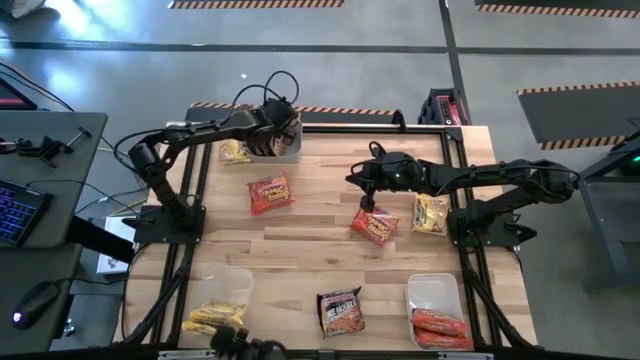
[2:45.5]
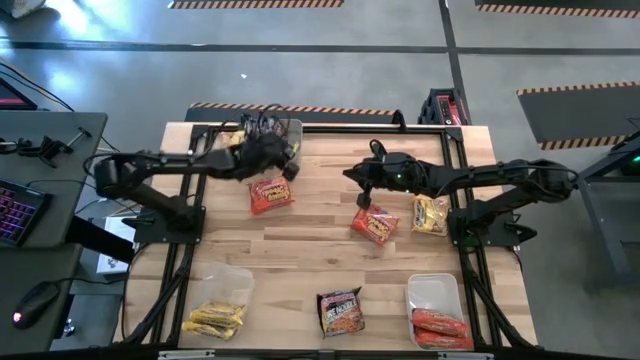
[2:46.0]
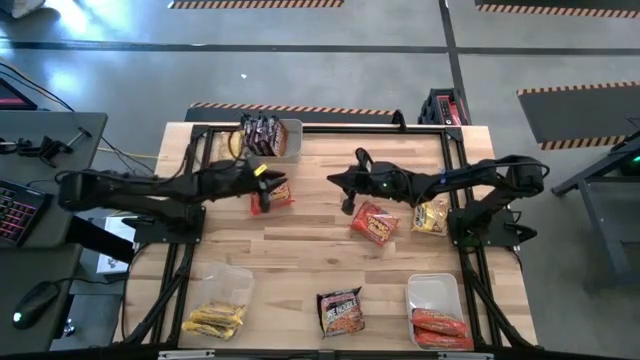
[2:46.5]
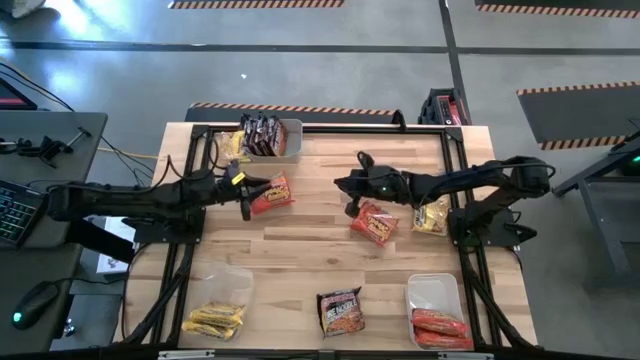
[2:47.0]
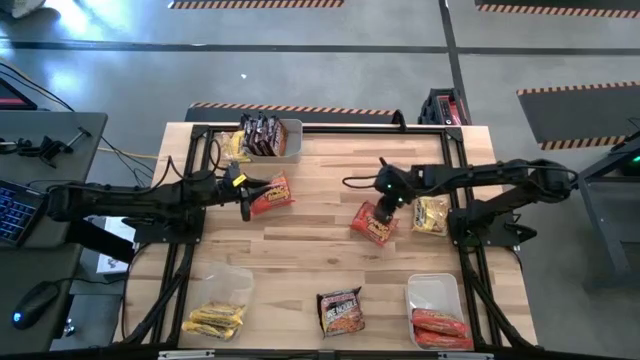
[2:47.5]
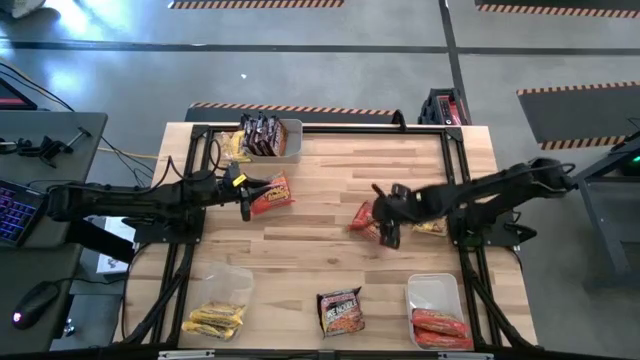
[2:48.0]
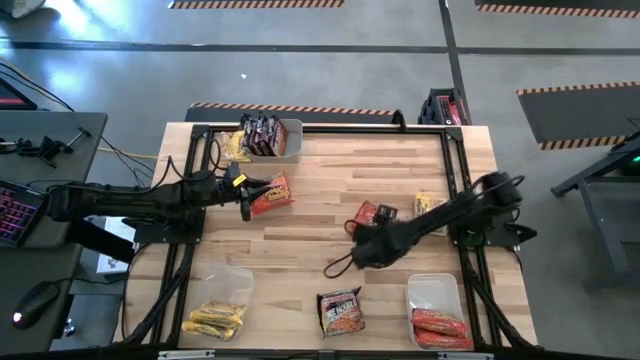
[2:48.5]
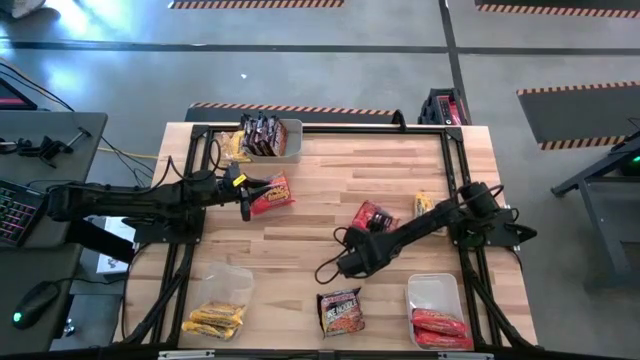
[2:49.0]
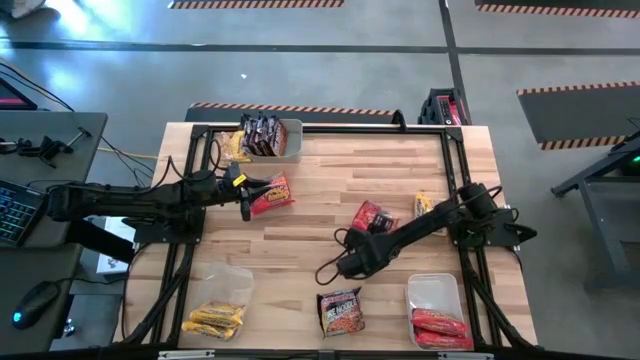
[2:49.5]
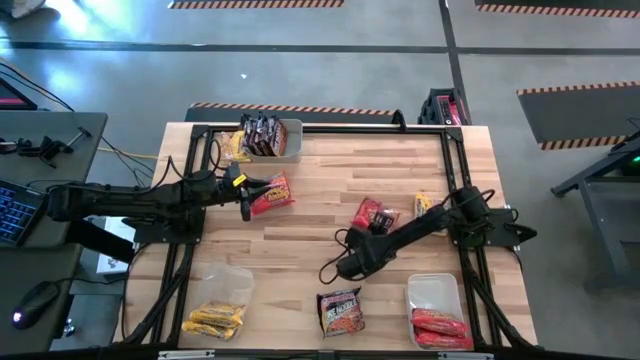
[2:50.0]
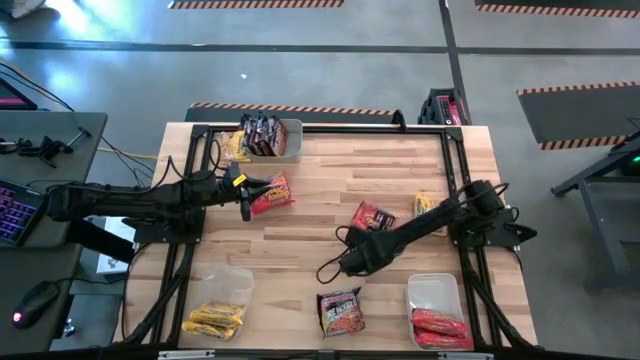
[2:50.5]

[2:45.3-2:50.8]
Task: Sort Maruchan noodles
Put the right orange noodle pack into the white bin

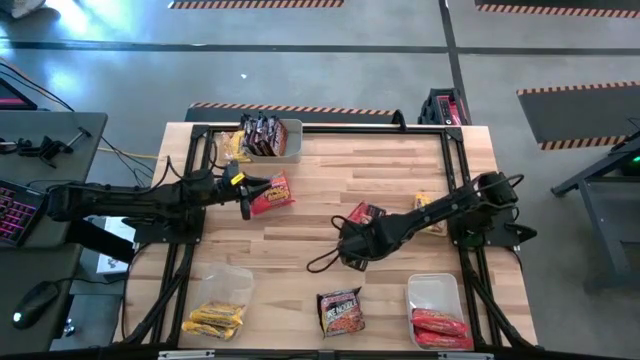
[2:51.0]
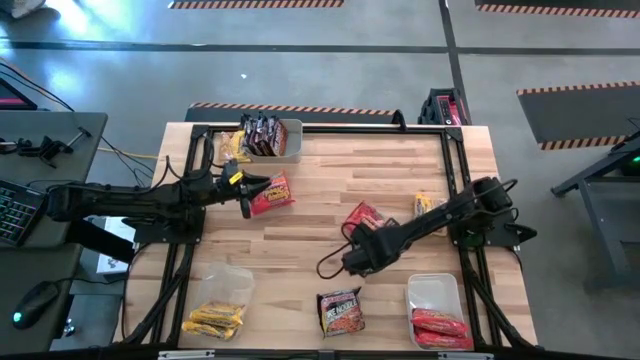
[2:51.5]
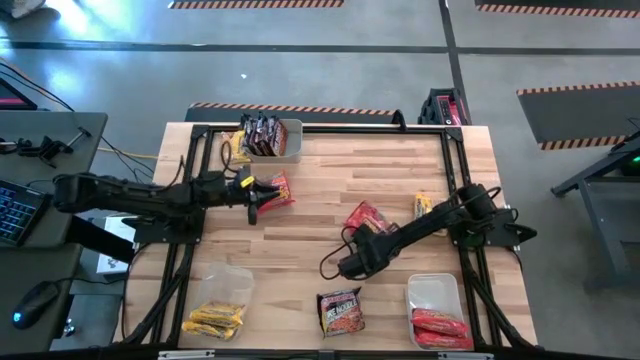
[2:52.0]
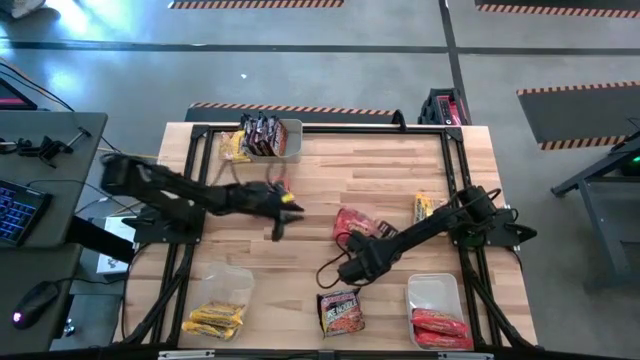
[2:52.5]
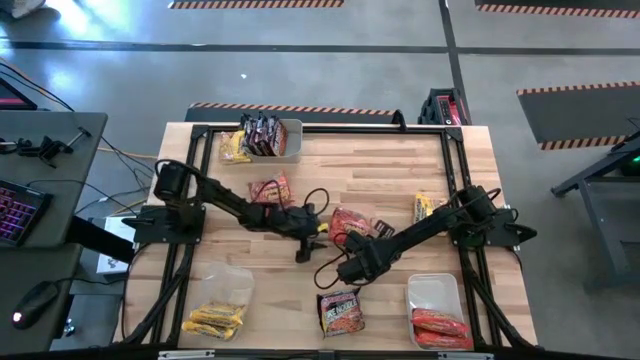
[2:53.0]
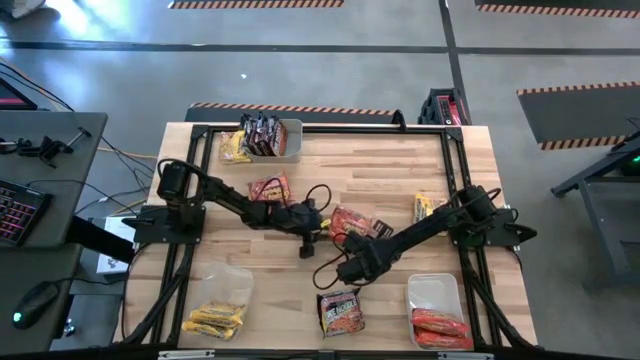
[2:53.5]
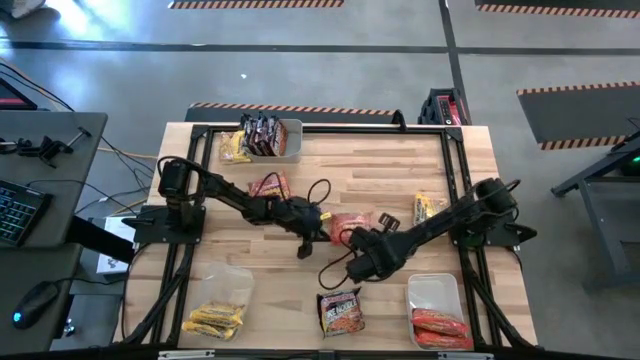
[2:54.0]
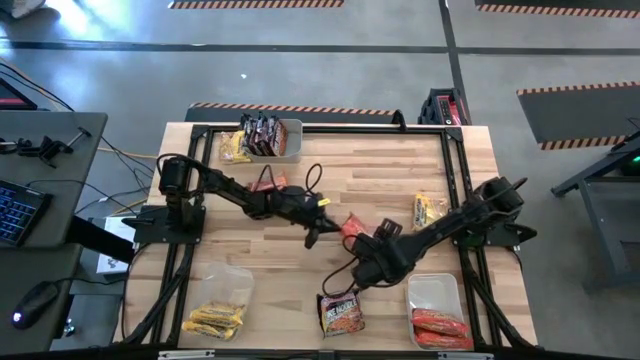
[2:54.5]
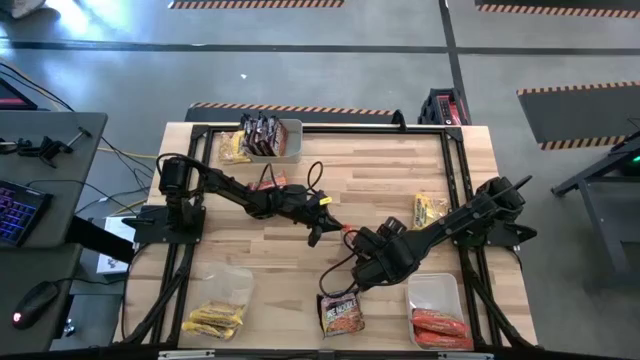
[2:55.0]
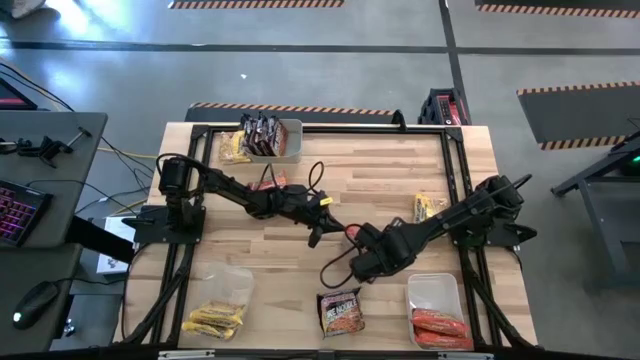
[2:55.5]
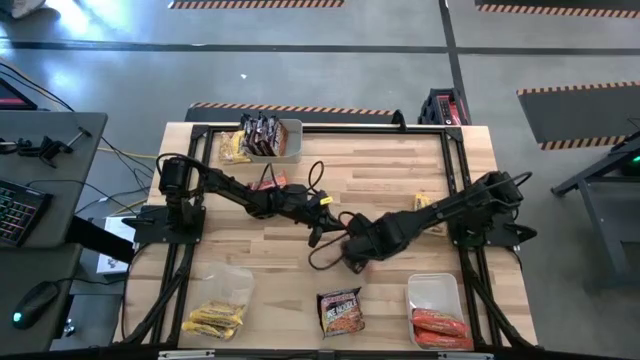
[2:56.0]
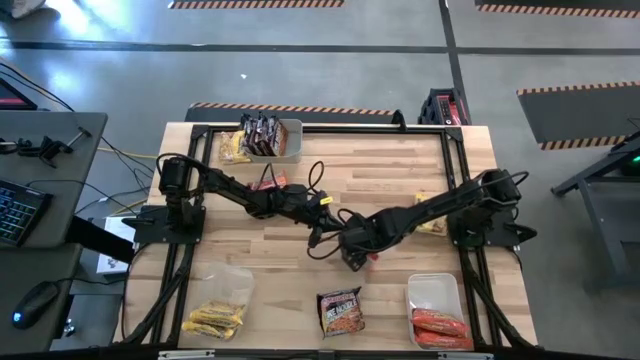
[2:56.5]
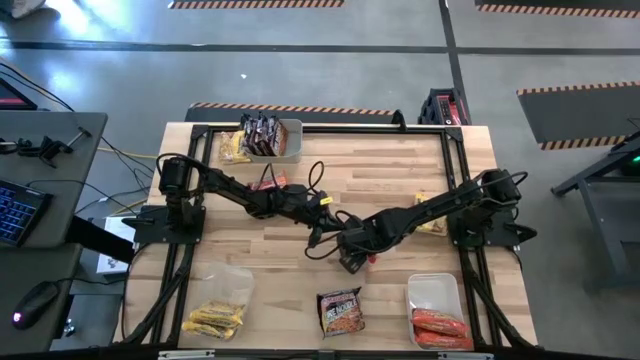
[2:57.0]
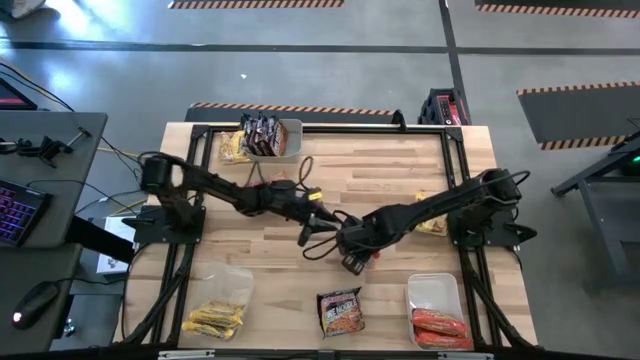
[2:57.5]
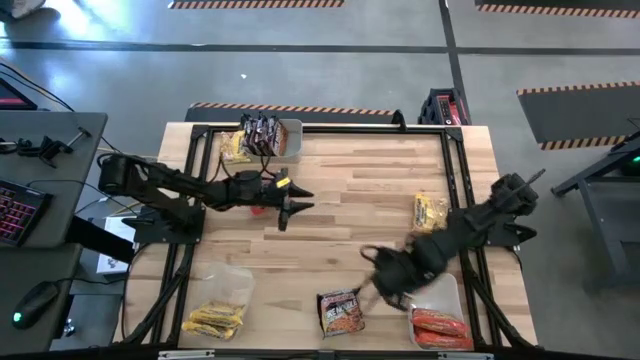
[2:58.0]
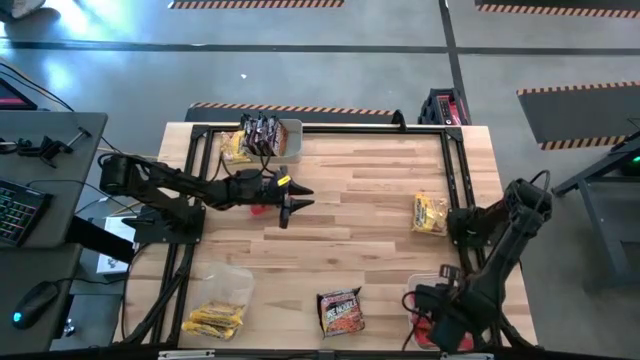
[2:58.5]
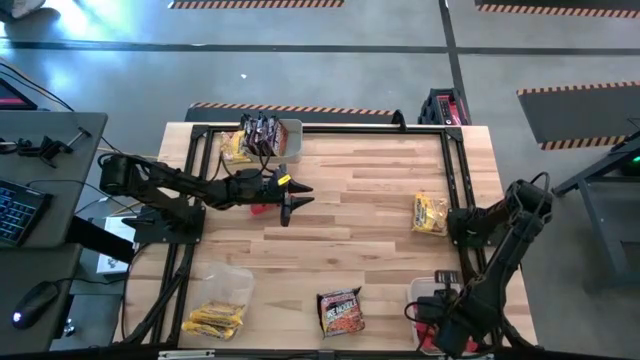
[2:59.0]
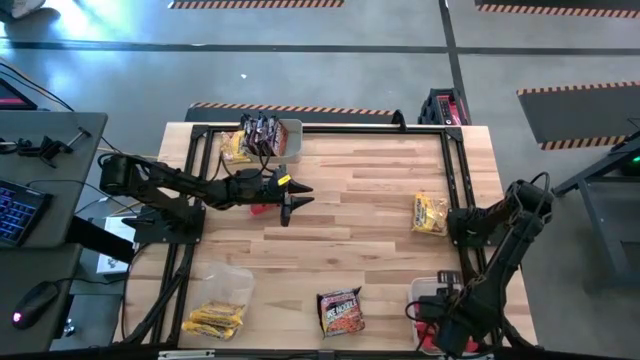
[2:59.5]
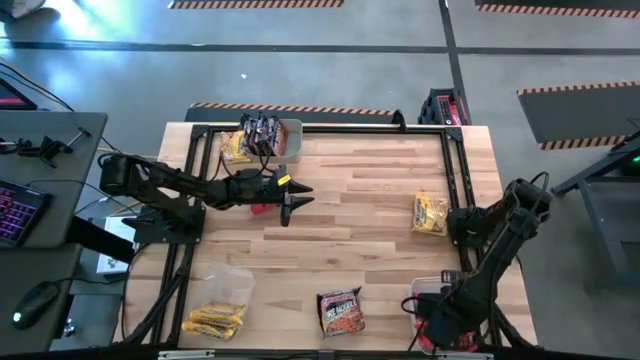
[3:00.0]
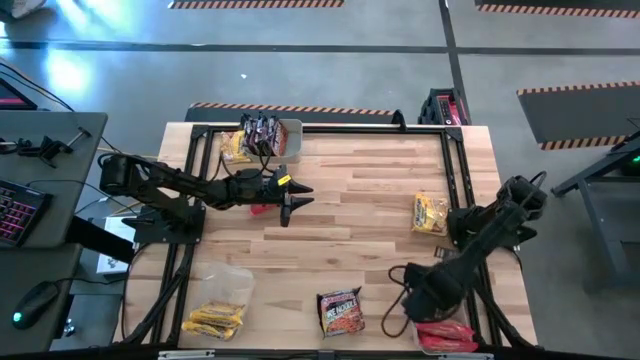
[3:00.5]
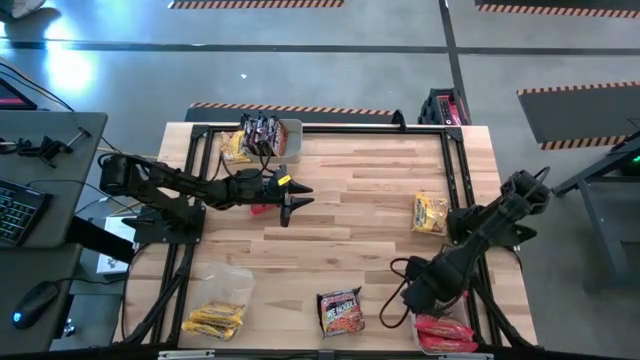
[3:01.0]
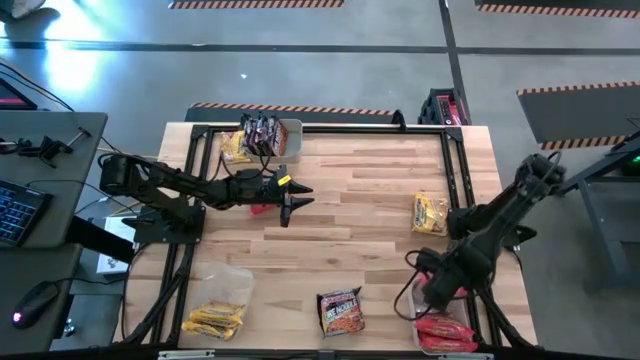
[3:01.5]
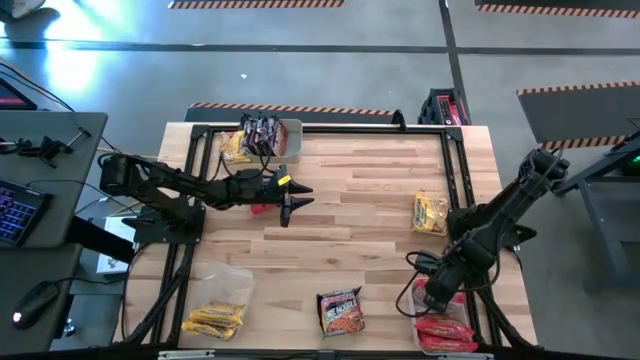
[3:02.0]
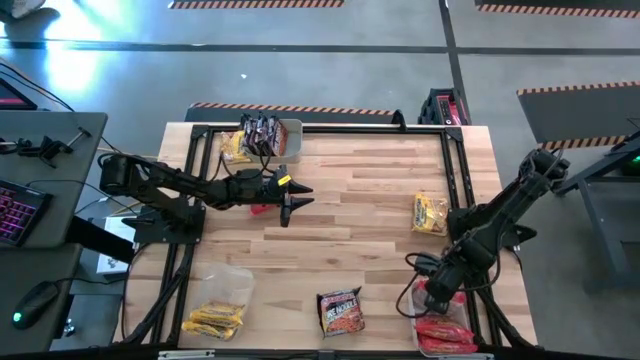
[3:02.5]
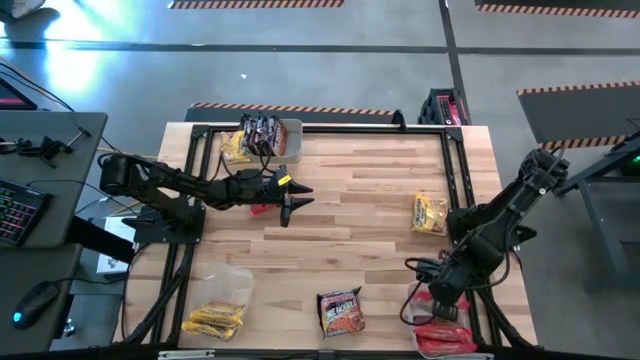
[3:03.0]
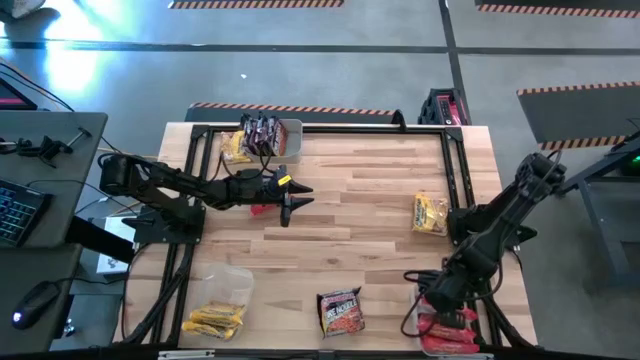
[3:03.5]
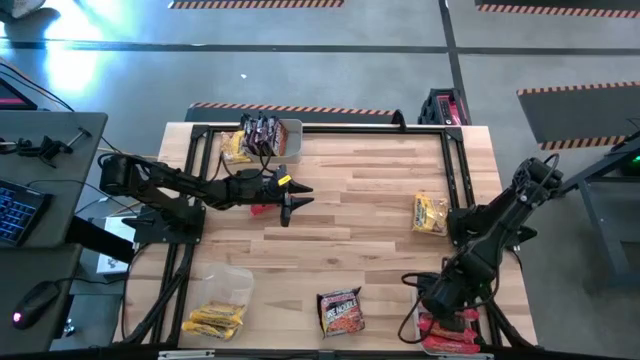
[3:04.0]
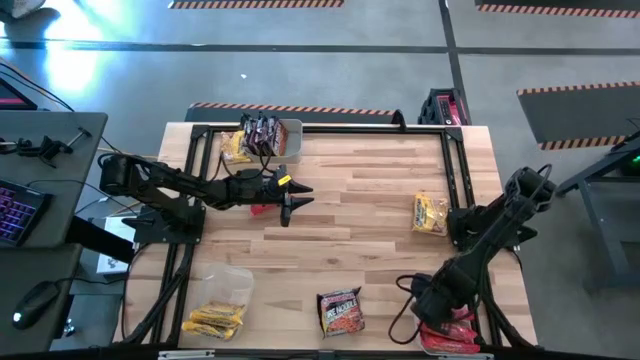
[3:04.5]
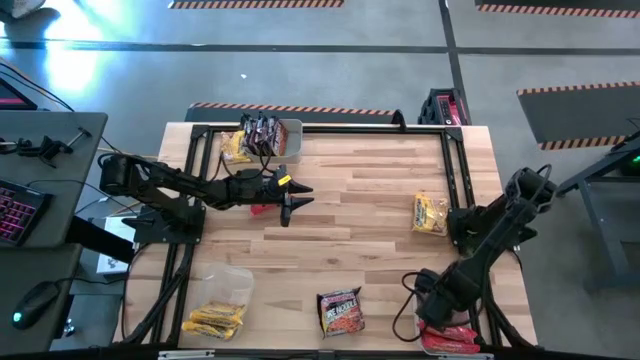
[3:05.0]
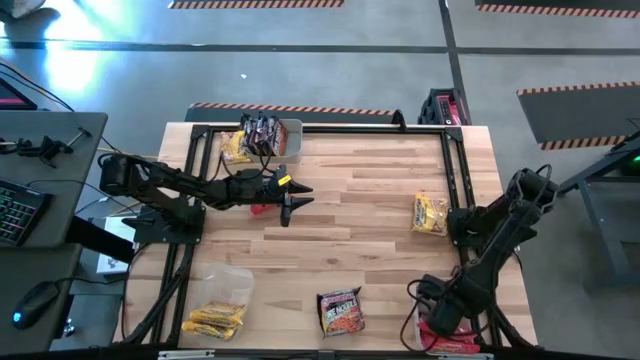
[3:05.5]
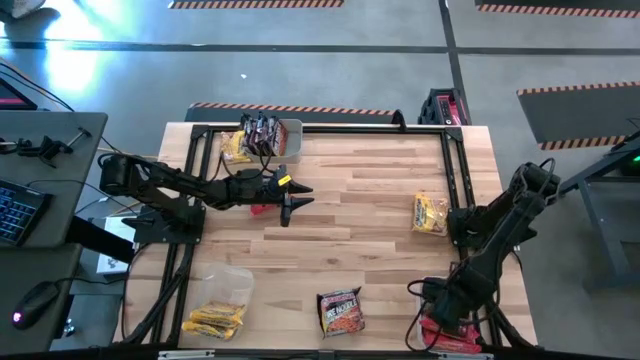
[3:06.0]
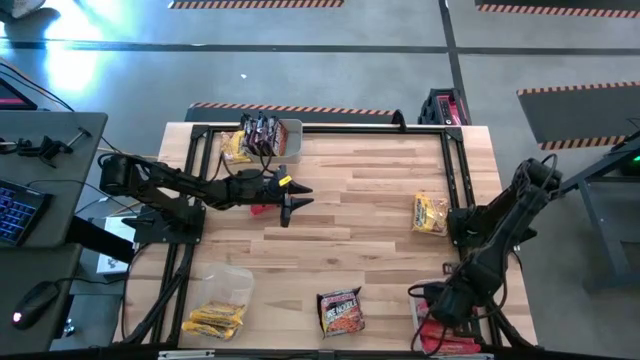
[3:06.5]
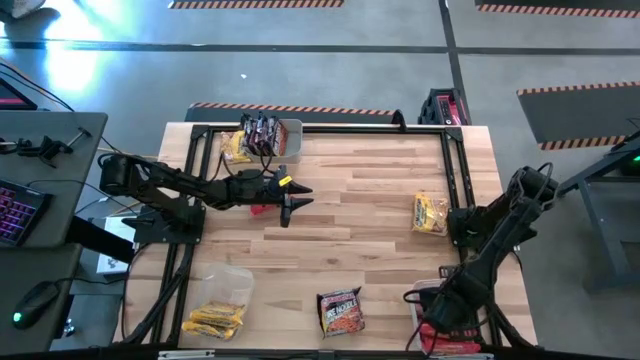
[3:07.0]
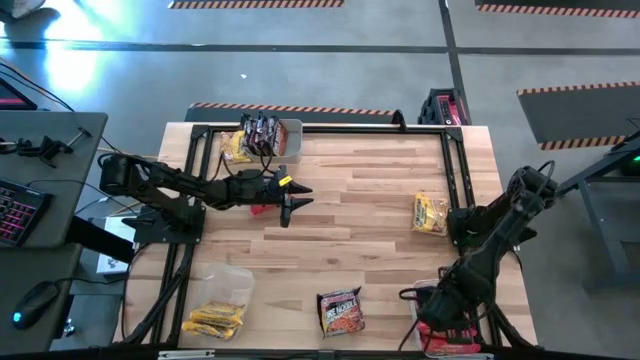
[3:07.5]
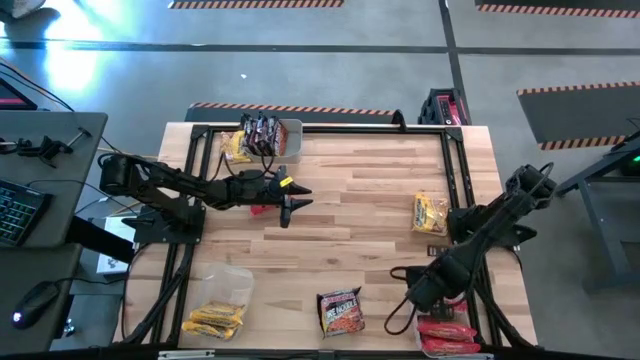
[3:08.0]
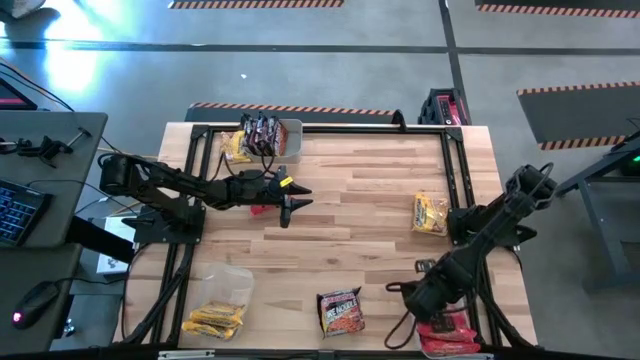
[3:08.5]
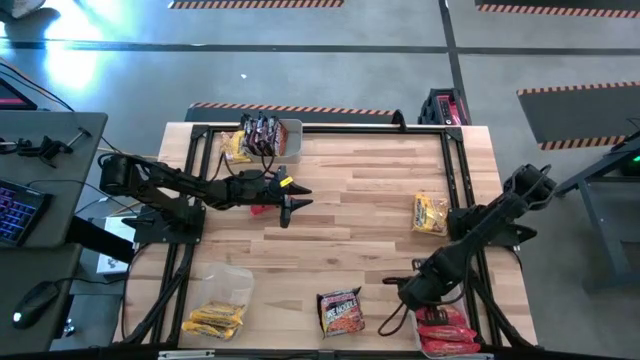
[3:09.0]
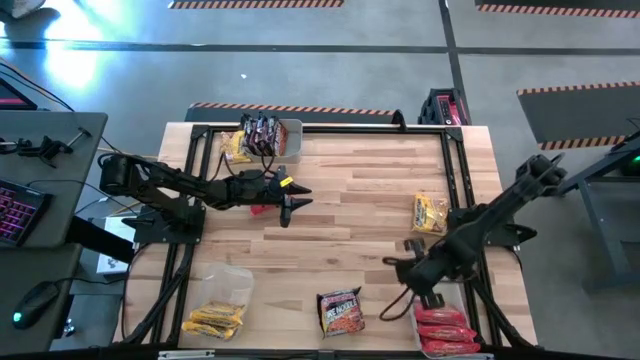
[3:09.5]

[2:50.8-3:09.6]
Put the right orange noodle pack into the white bin
